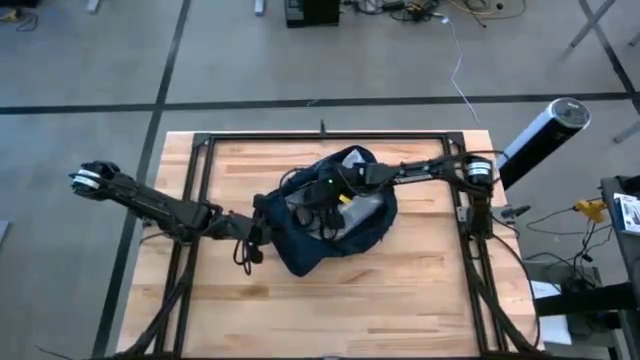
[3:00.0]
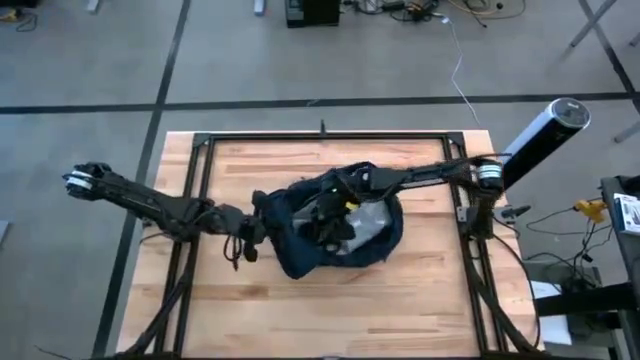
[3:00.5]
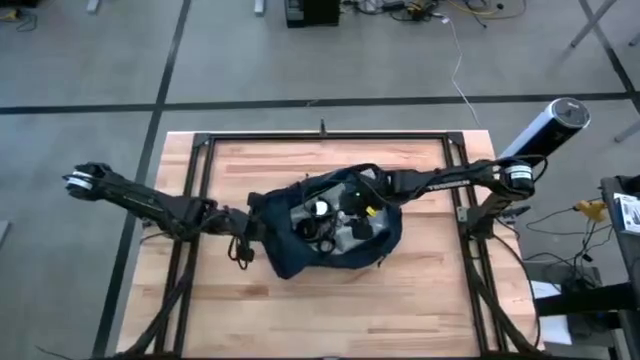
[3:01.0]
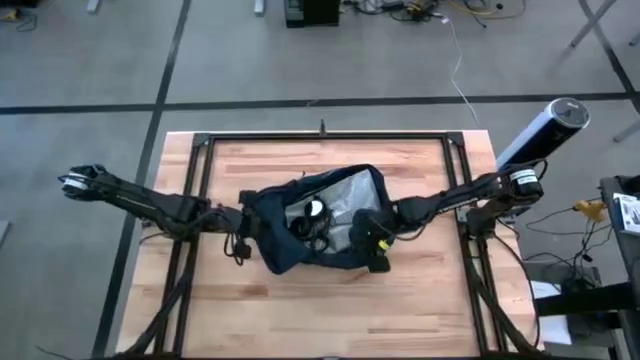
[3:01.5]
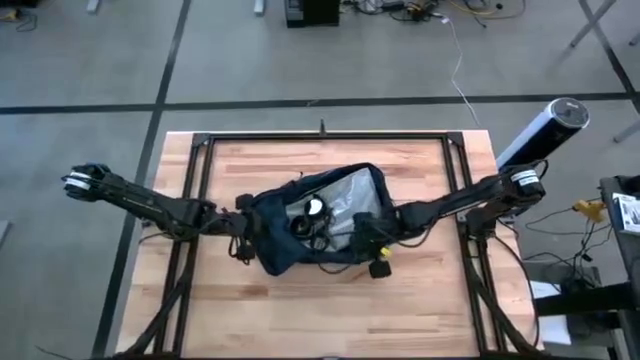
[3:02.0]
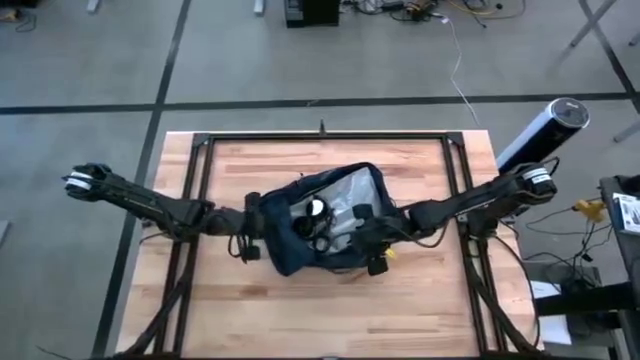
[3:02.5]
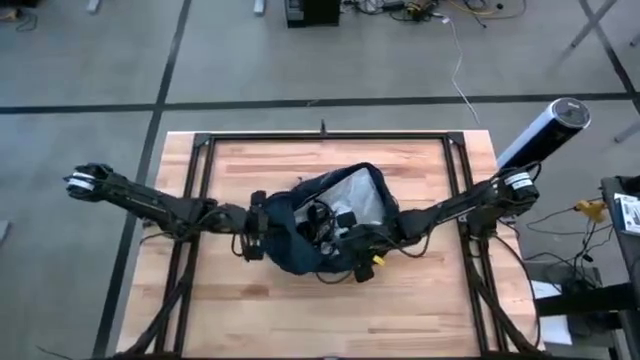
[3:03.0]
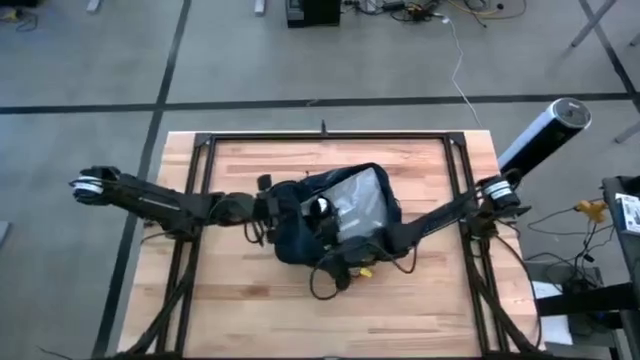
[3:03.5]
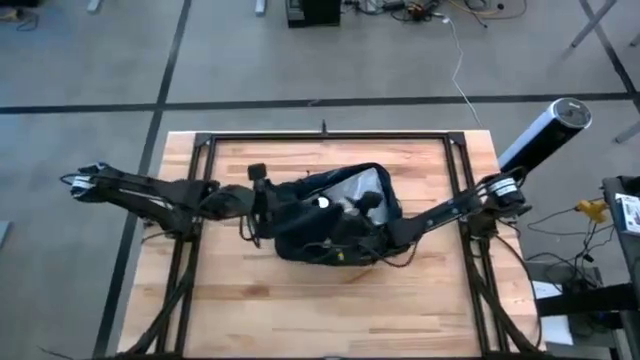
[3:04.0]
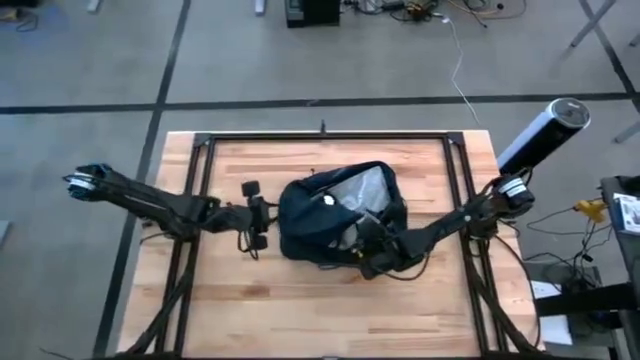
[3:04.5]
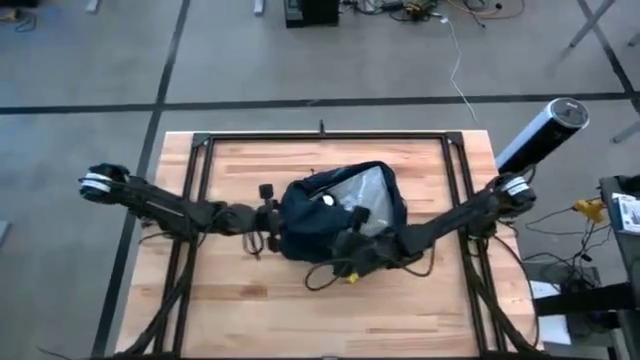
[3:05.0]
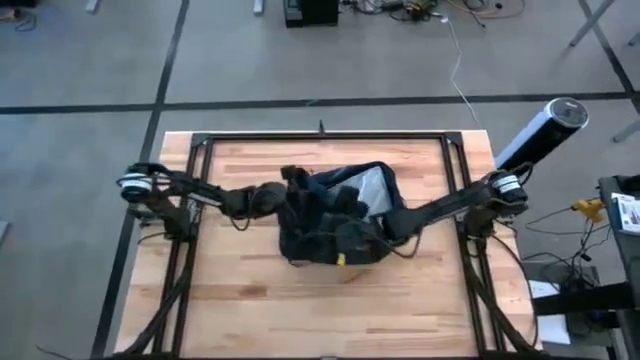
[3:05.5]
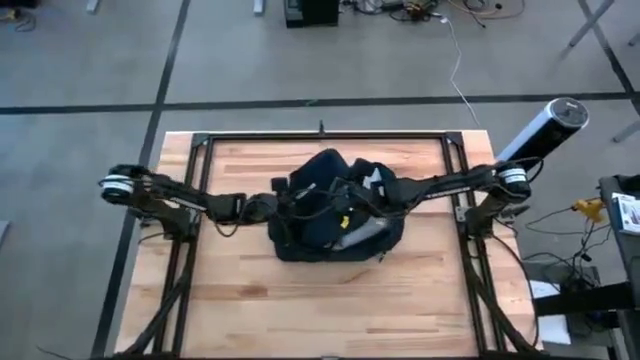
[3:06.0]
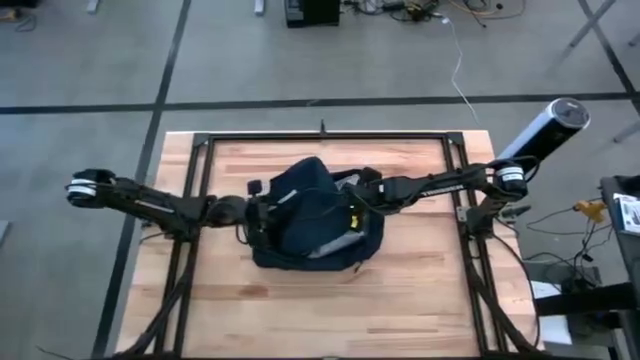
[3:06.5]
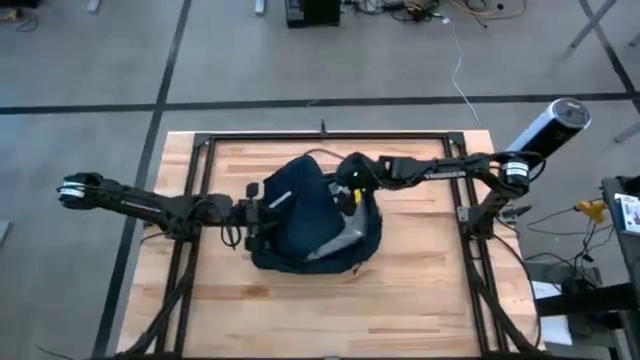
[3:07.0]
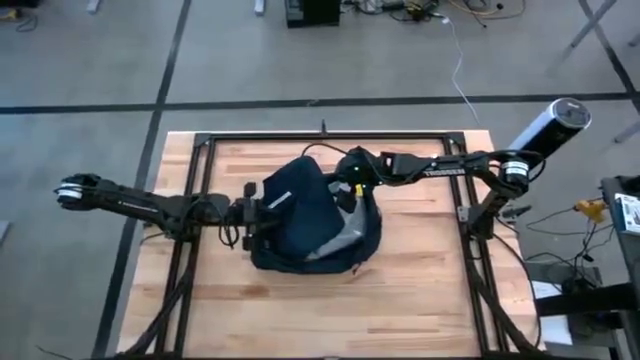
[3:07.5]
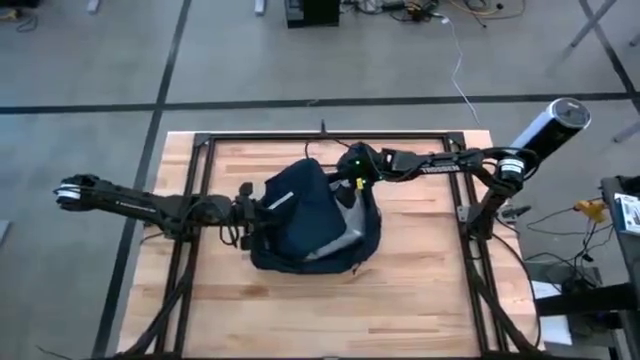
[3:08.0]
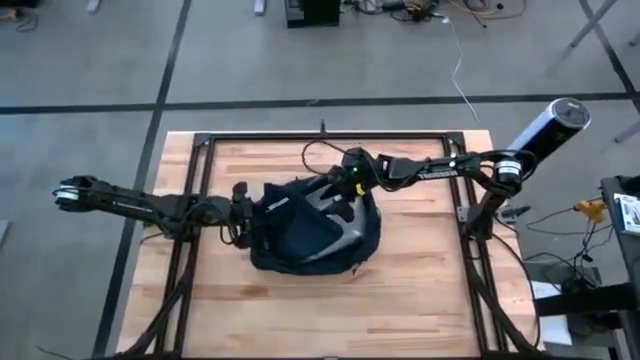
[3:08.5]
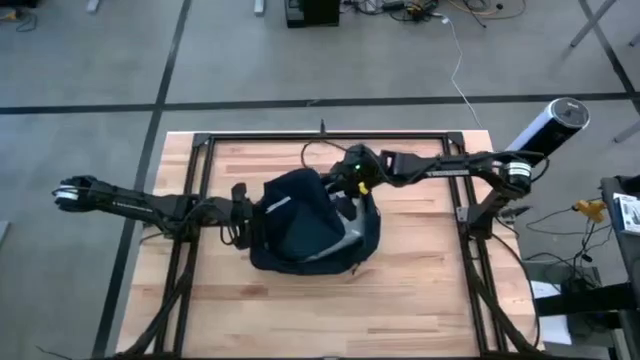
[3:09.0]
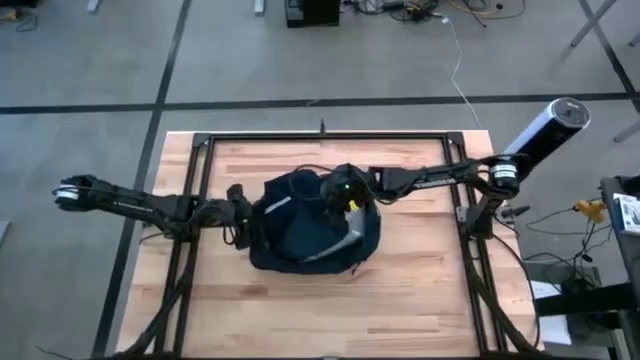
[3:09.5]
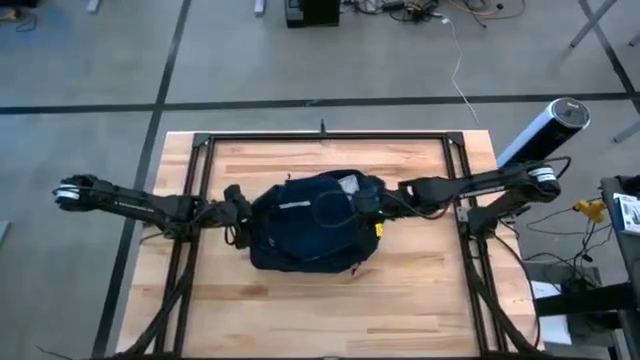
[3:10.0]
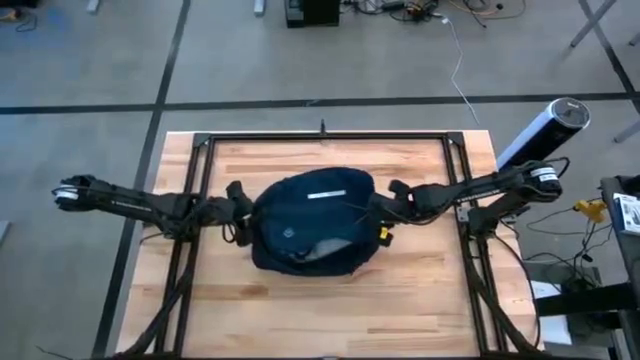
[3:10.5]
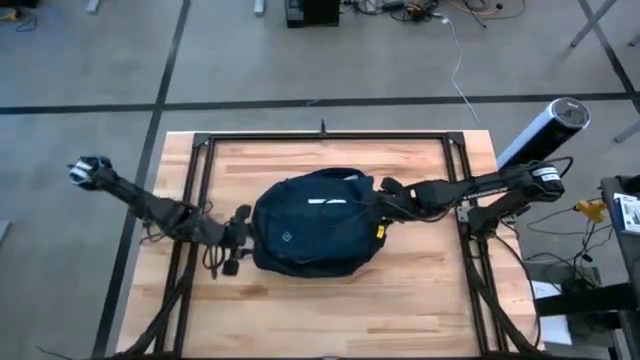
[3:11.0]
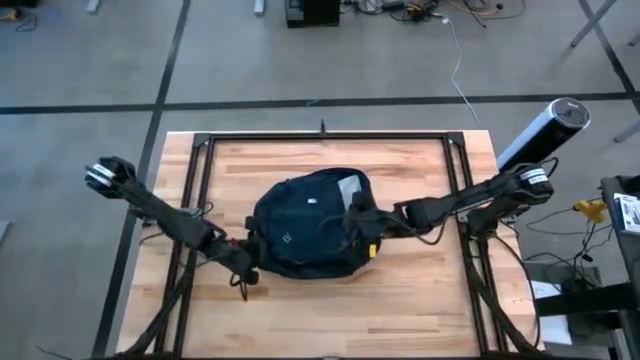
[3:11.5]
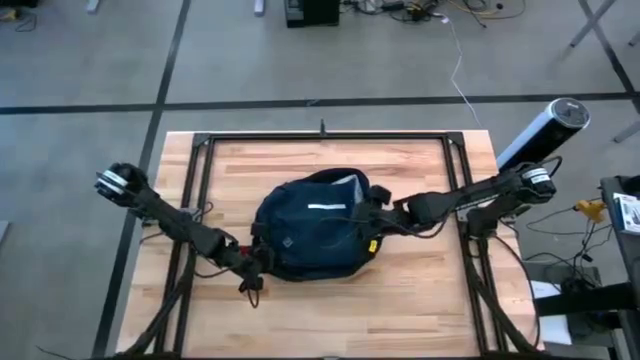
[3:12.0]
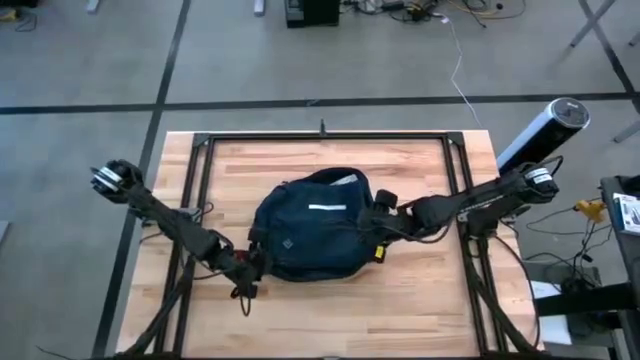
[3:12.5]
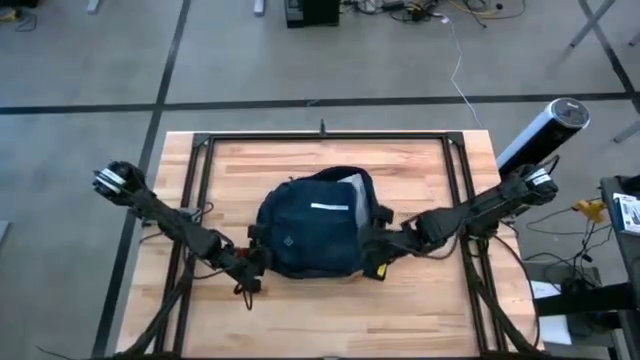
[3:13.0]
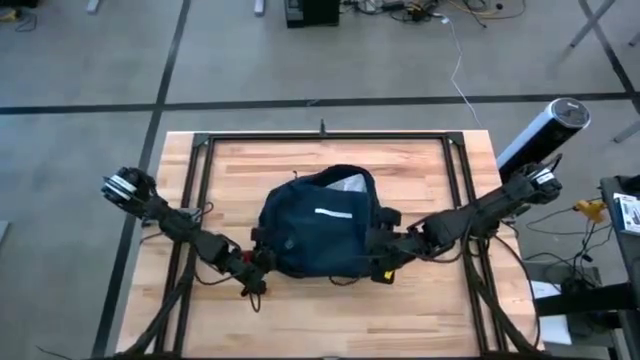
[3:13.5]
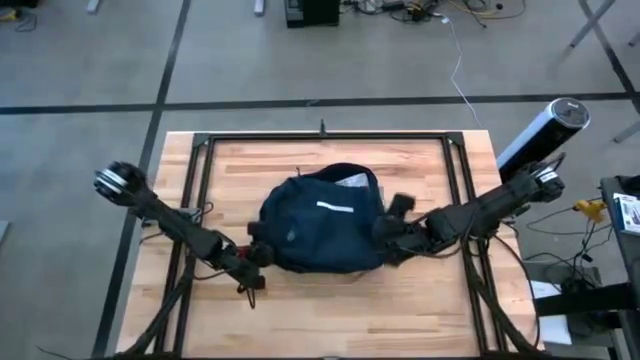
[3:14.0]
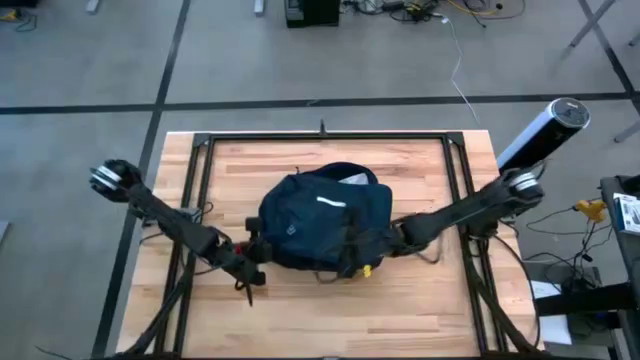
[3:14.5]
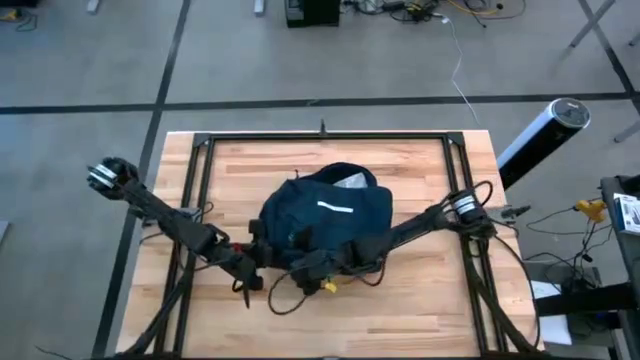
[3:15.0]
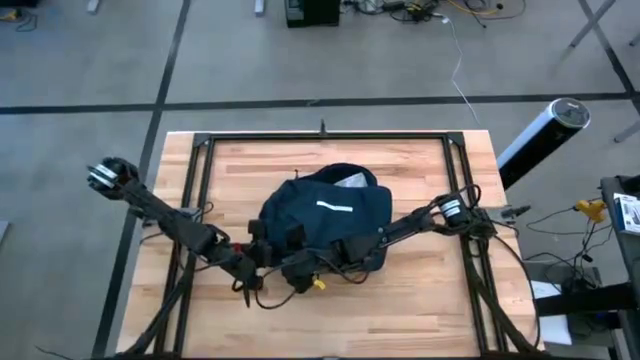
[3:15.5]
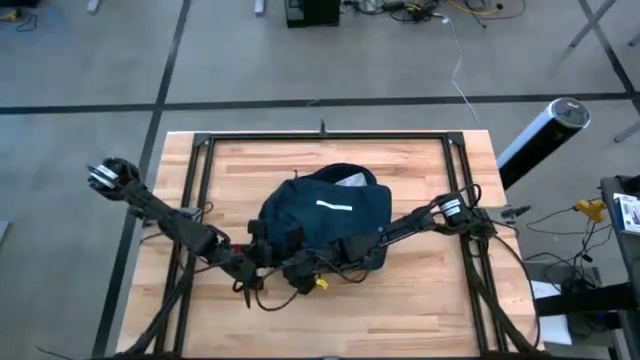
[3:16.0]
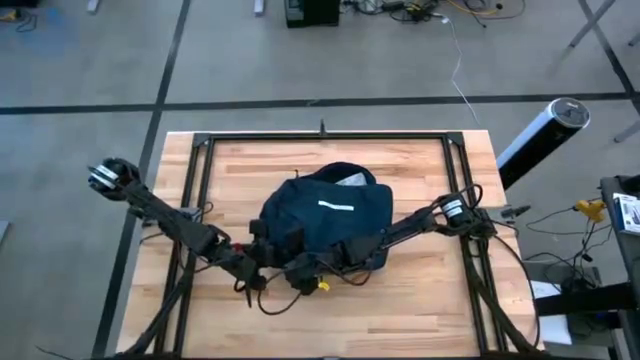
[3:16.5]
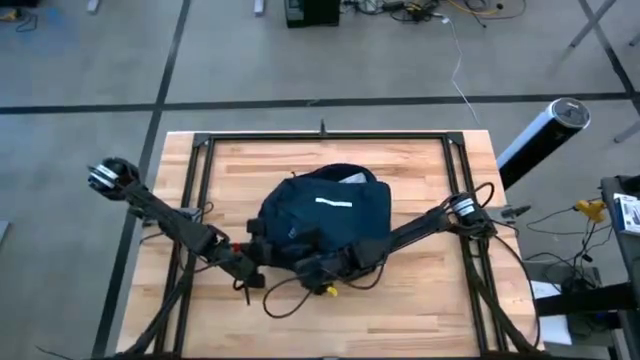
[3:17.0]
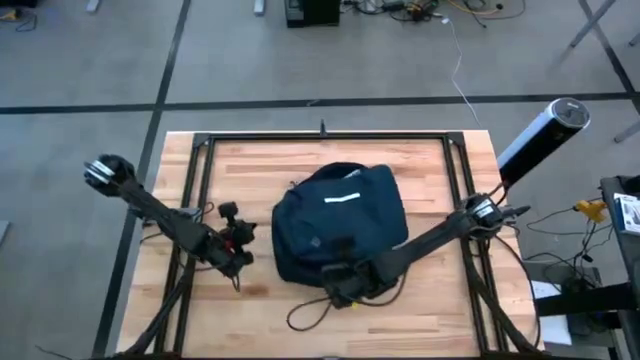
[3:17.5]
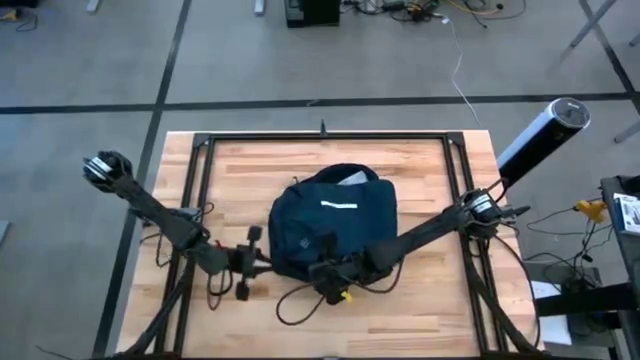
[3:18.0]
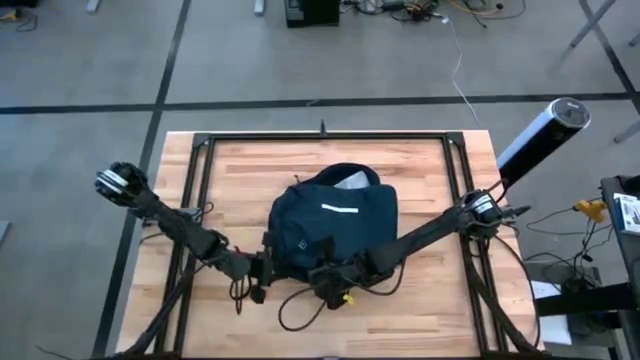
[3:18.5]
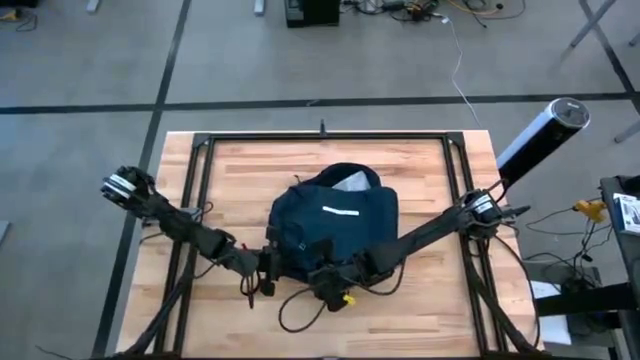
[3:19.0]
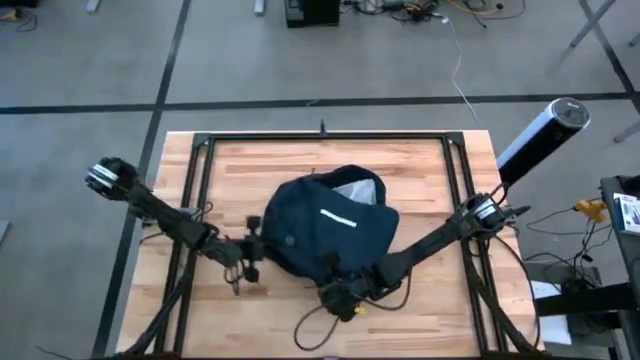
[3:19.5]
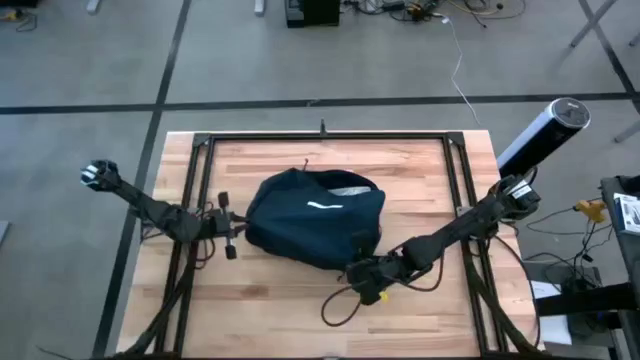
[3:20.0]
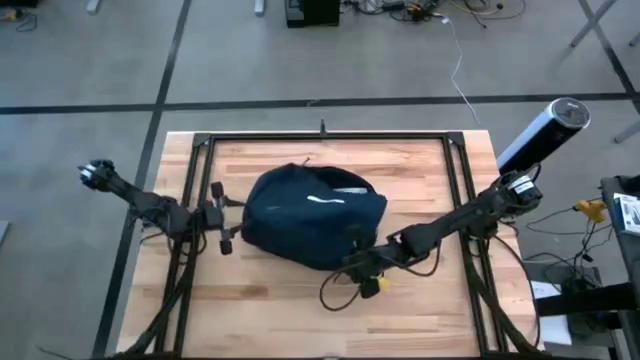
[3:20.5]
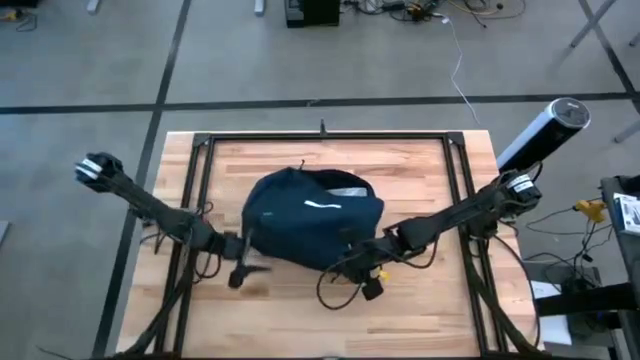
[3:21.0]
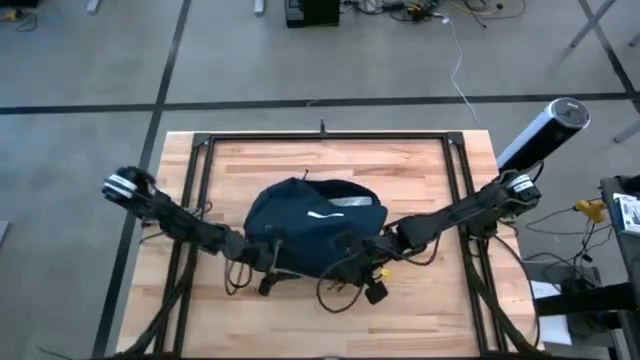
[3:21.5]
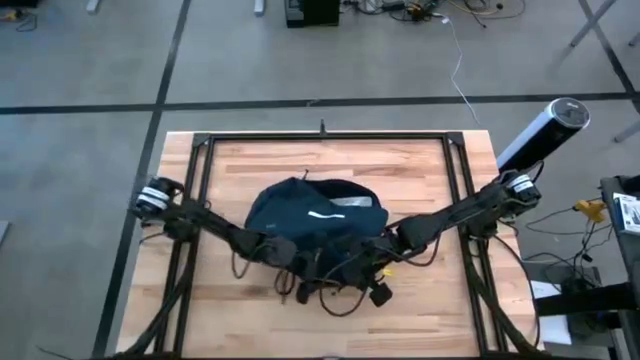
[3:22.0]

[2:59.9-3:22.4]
Task: Unpack backpack
Close the blue backpack
